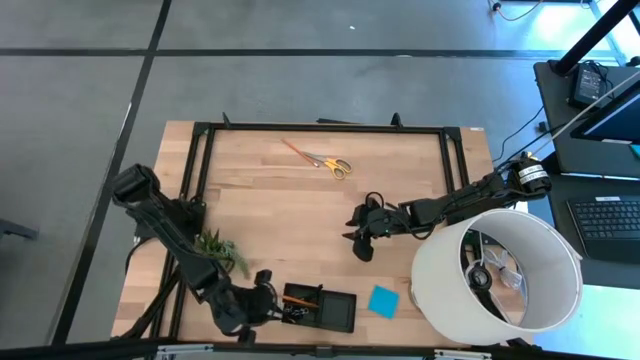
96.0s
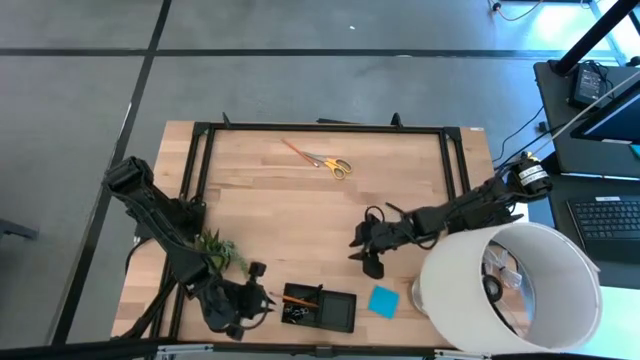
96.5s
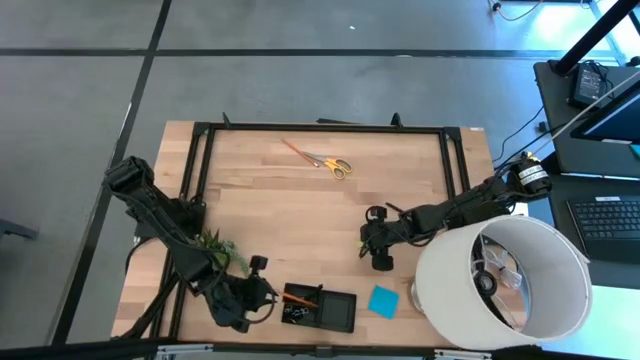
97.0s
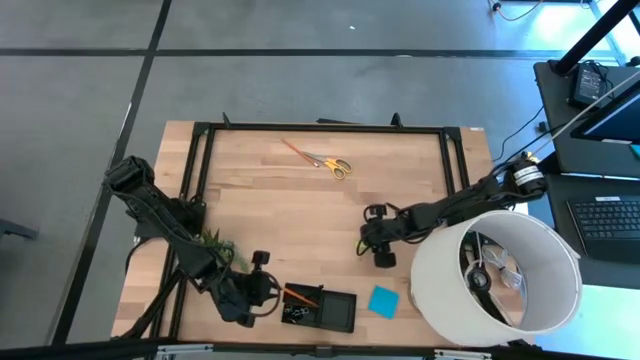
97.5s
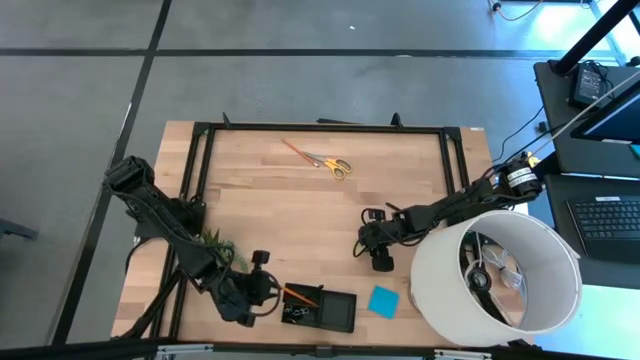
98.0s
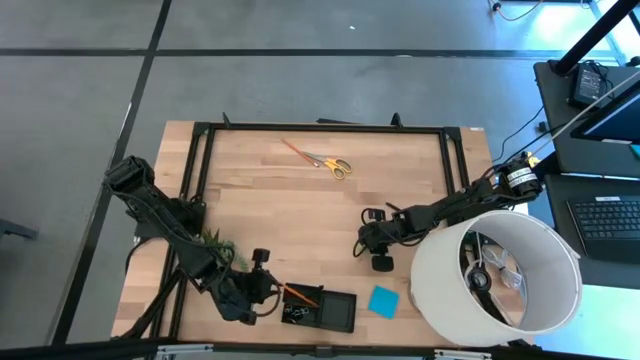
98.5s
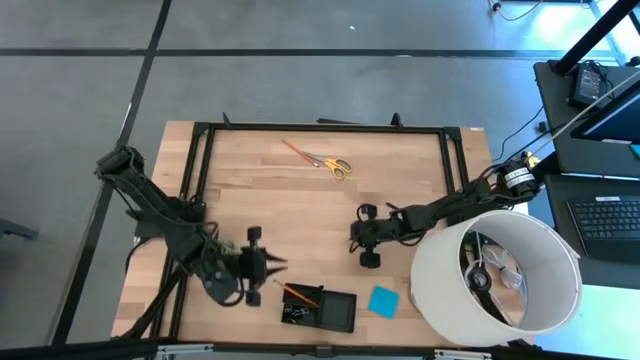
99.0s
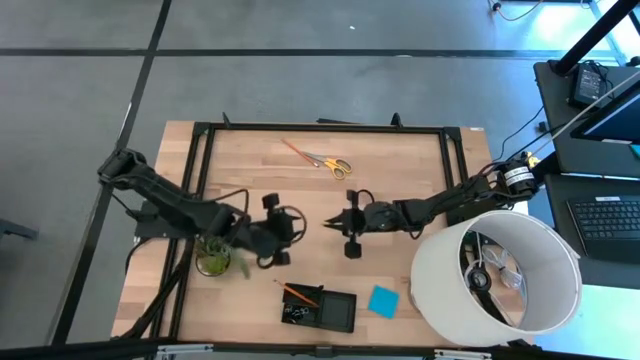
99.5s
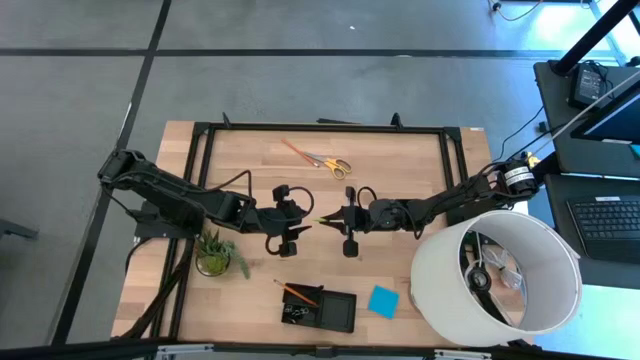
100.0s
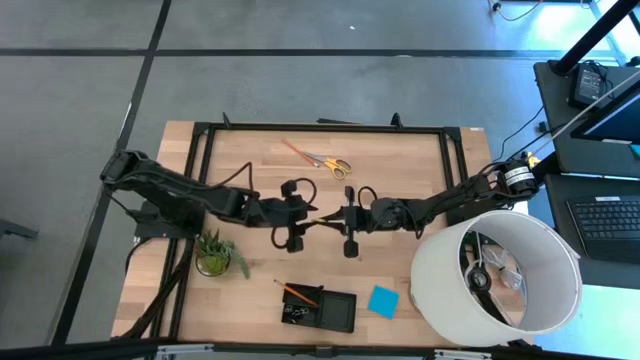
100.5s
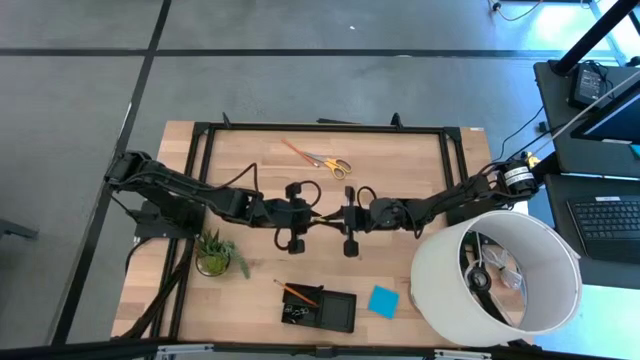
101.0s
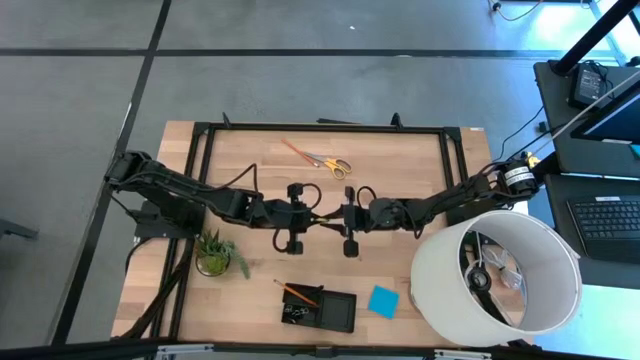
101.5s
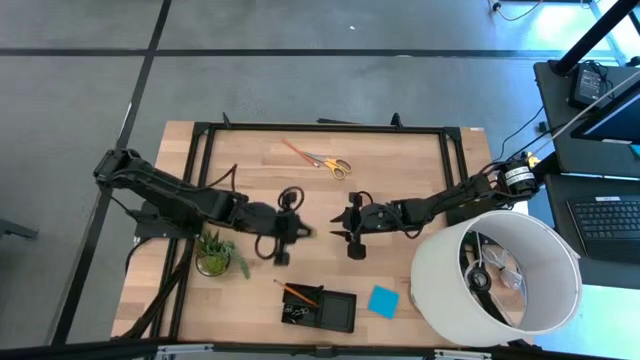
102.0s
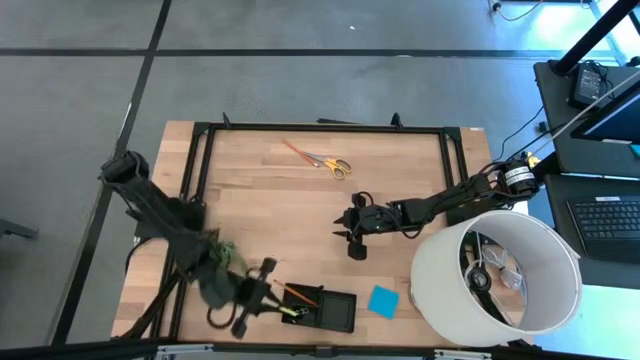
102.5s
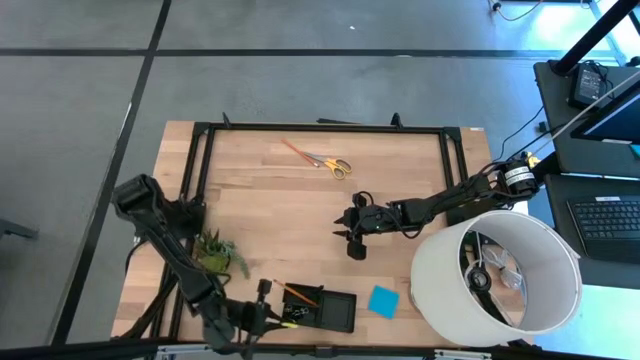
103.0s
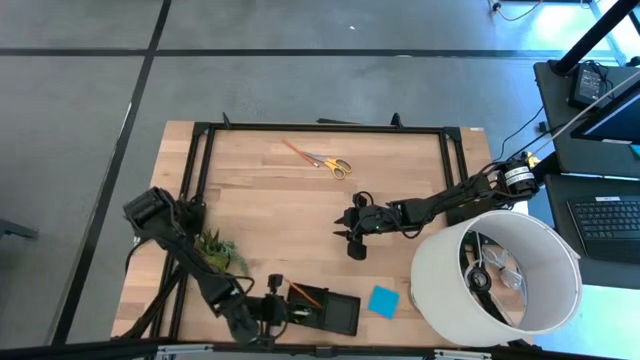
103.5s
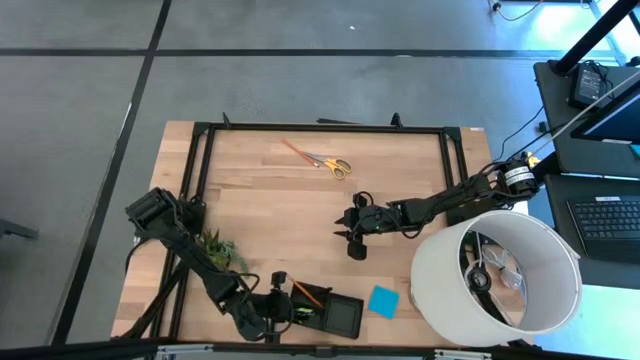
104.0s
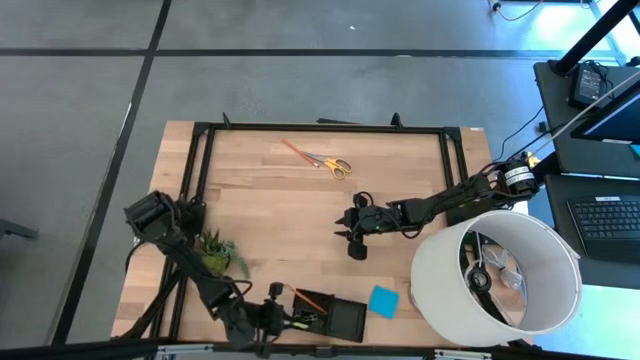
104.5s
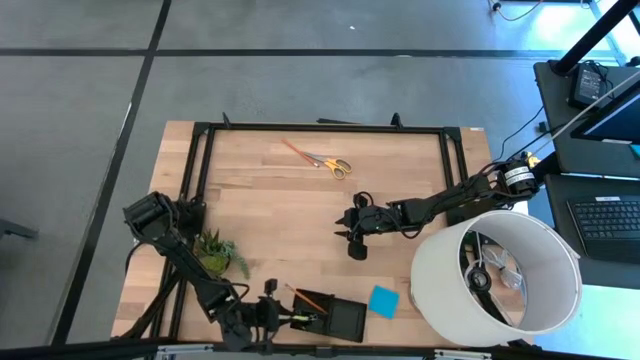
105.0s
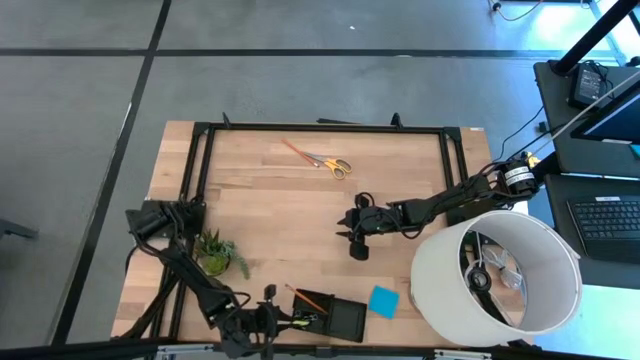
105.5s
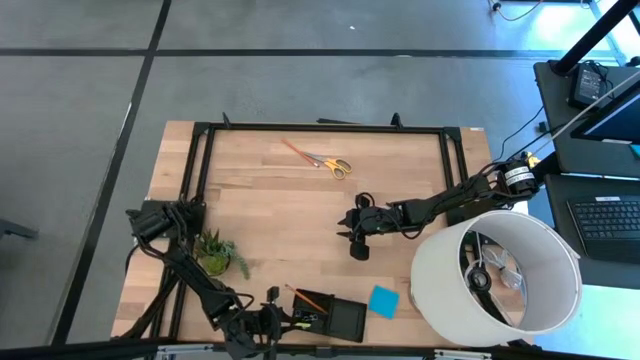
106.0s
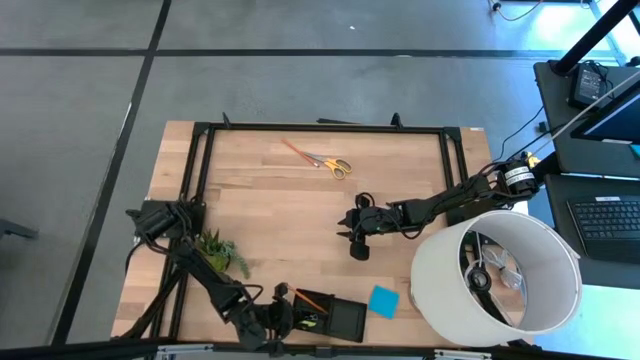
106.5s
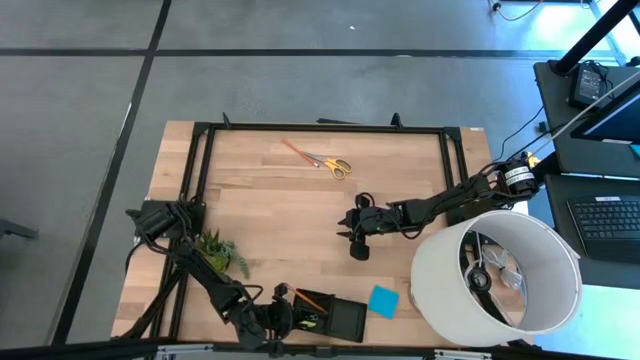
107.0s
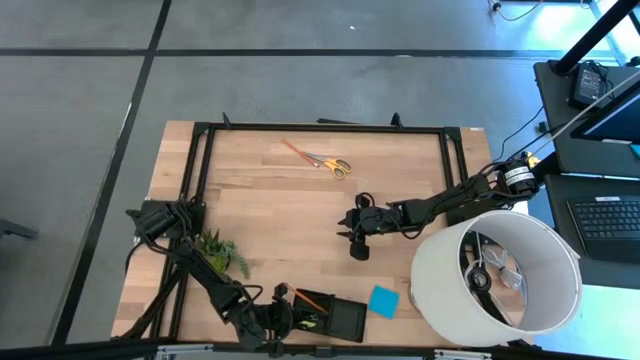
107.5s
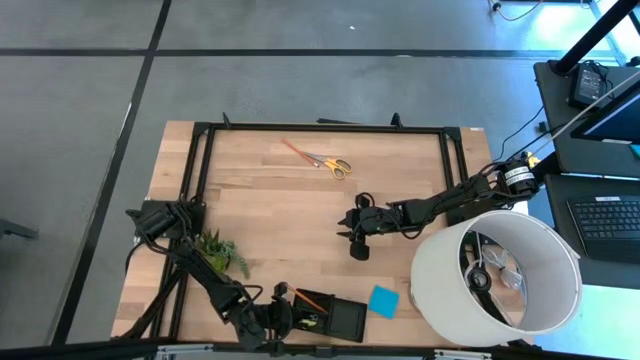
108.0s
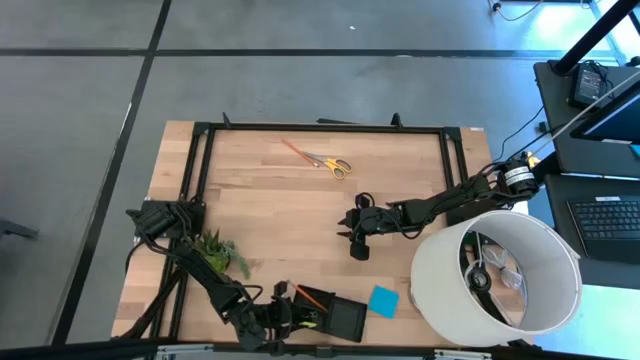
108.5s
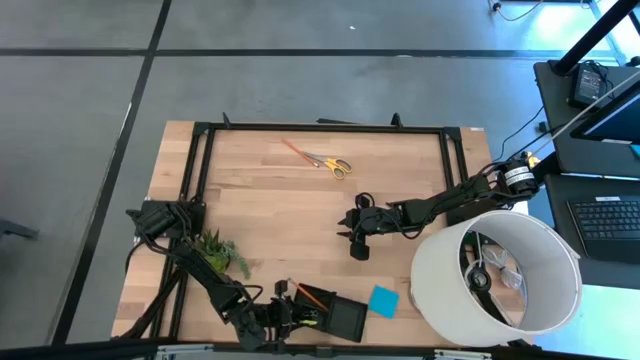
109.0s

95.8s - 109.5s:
Task: Pick and place office supplies into organizer
Put the green eraser into the black desk organizer

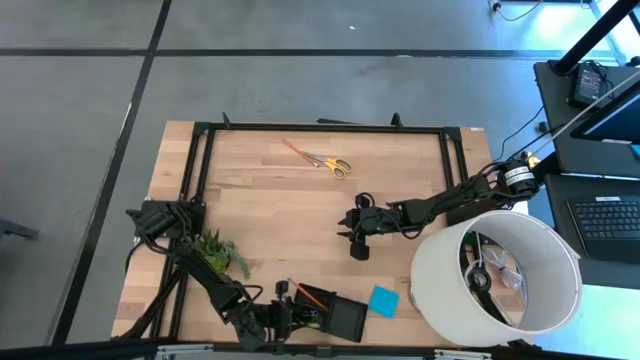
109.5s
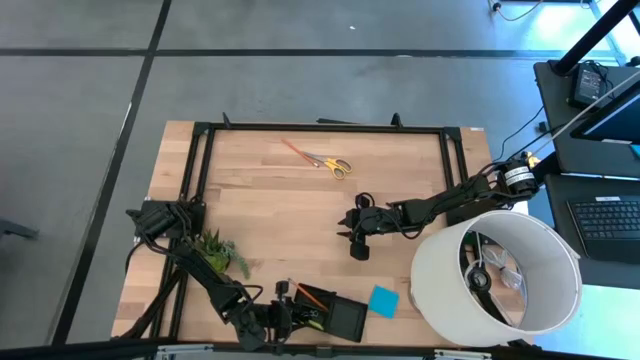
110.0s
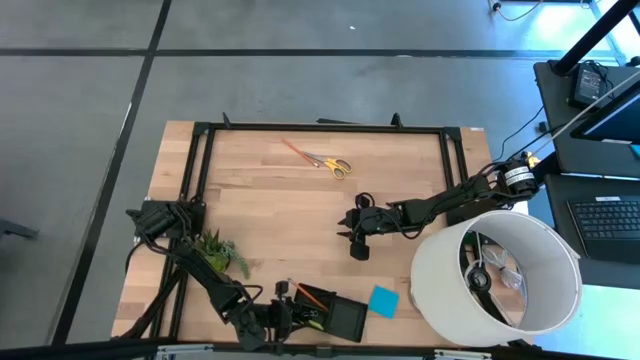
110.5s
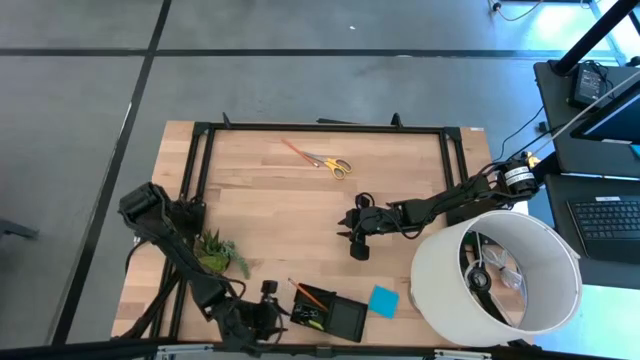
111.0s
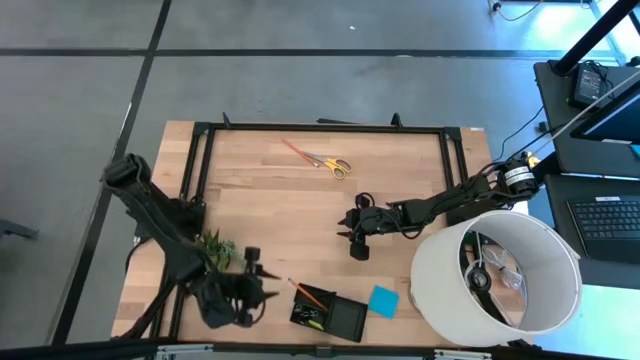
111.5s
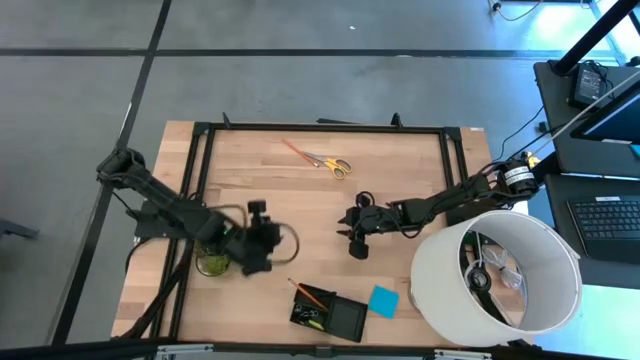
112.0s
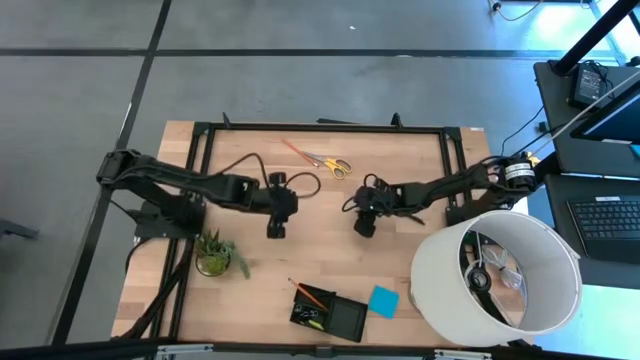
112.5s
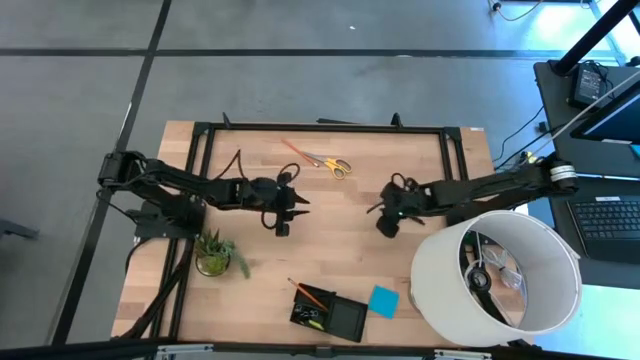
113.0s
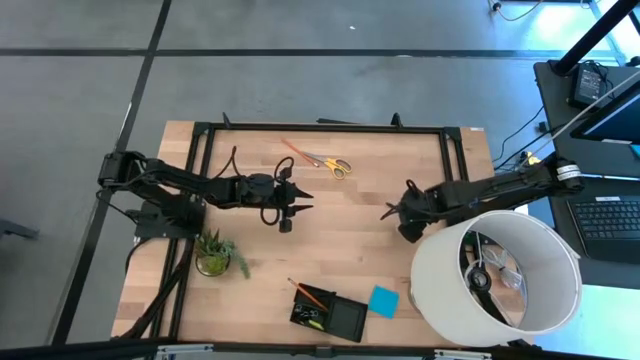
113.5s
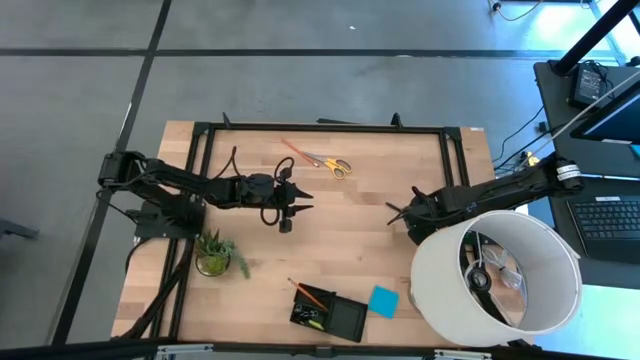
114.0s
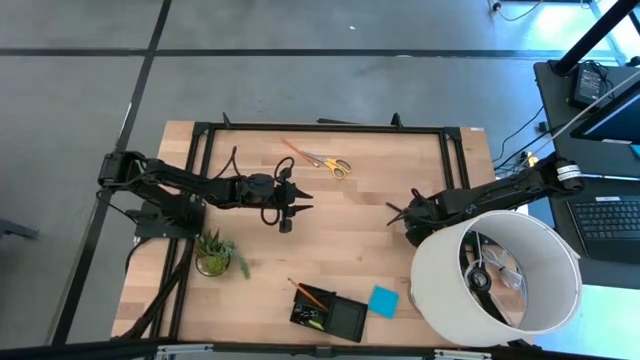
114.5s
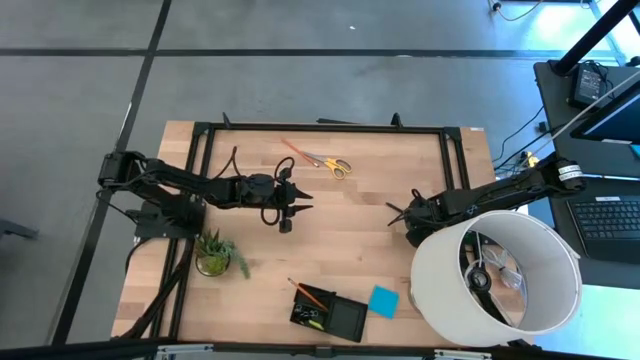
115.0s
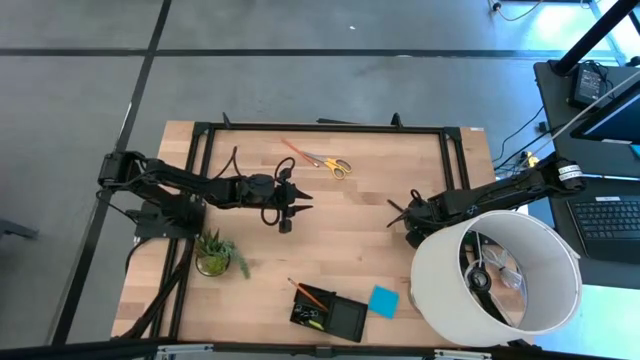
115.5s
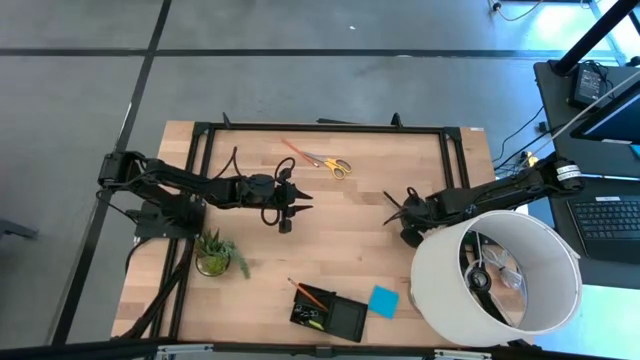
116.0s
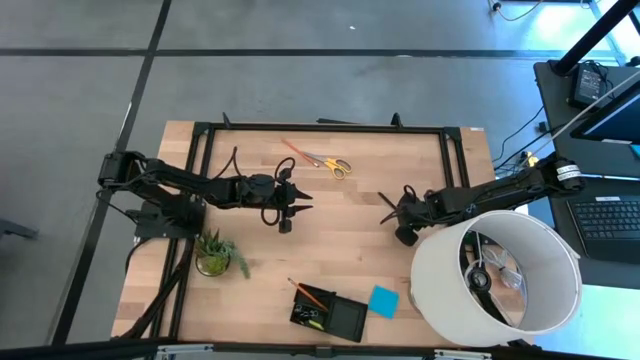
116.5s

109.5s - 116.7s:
Put the black pen into the black desk organizer
